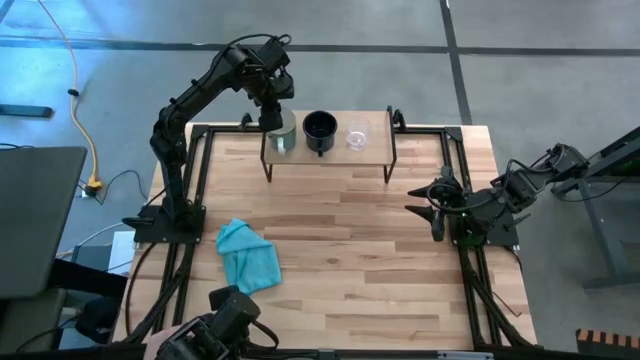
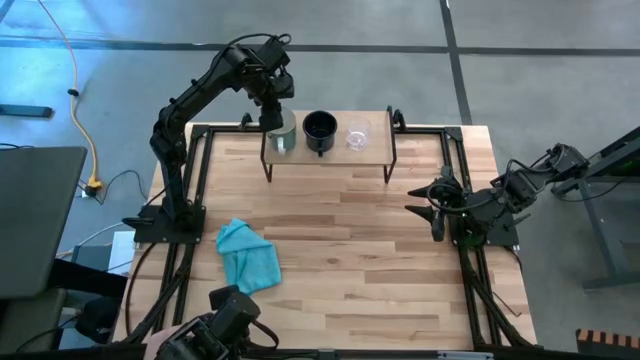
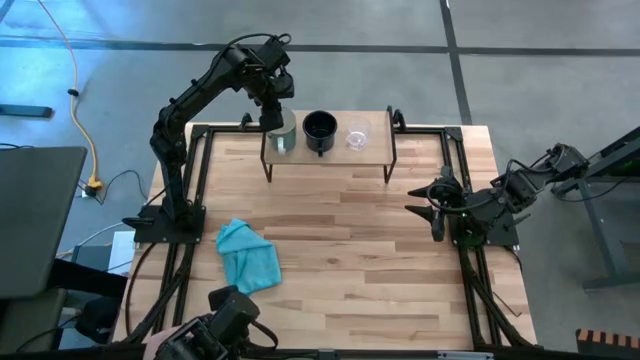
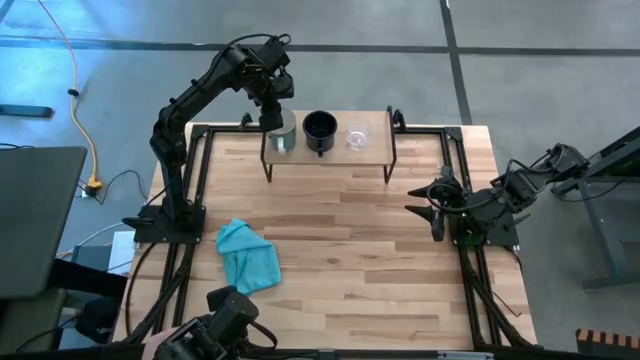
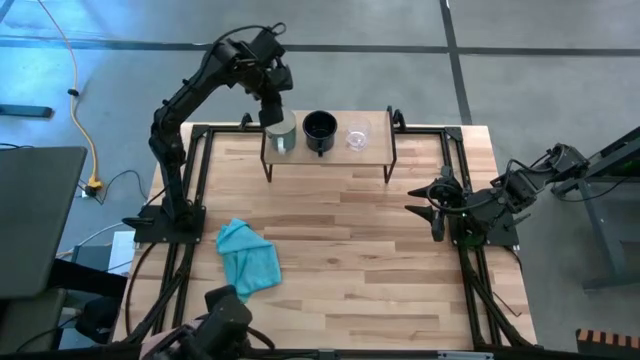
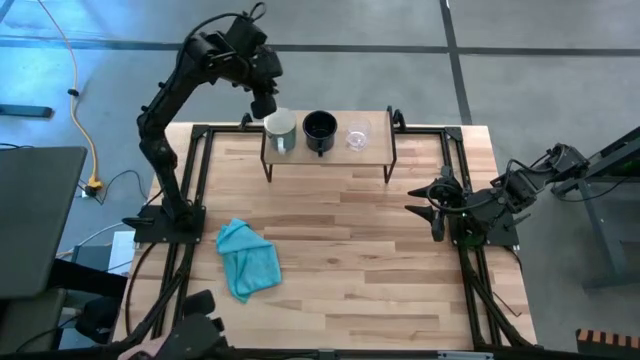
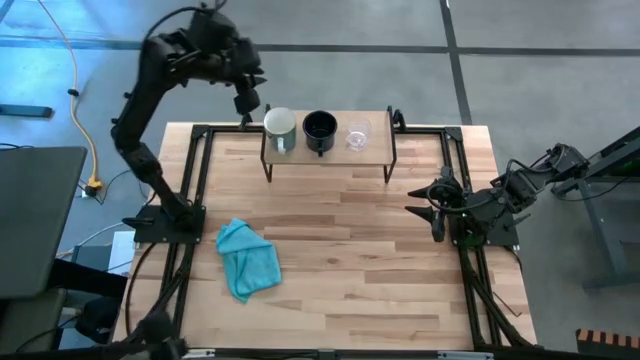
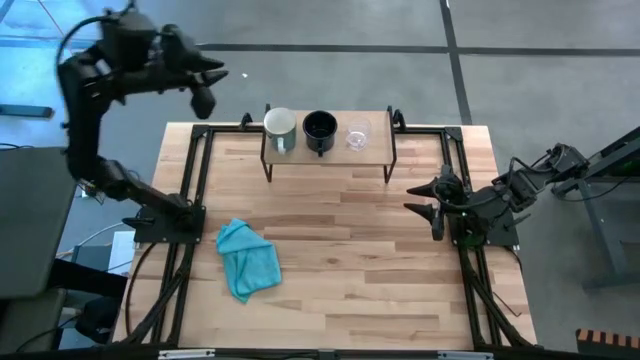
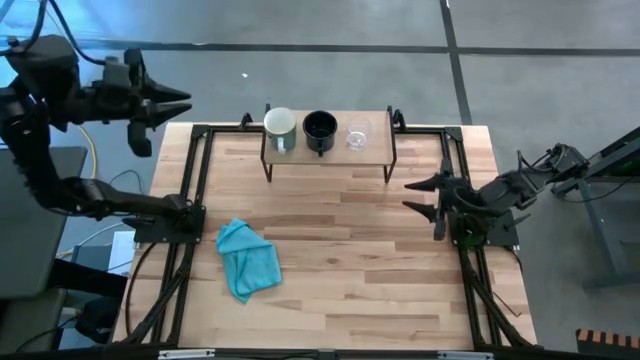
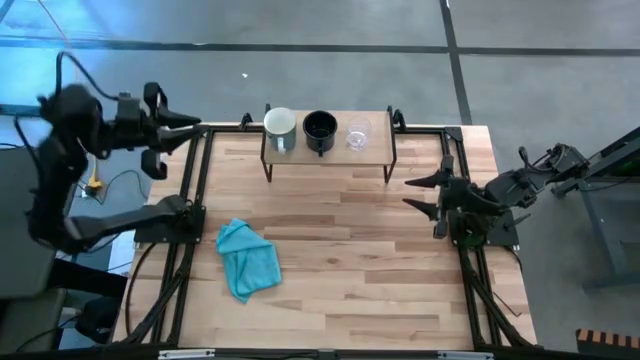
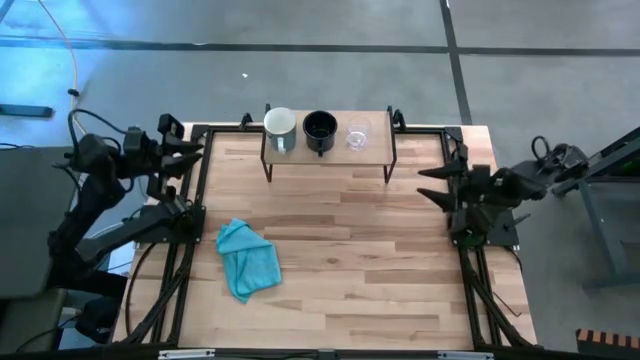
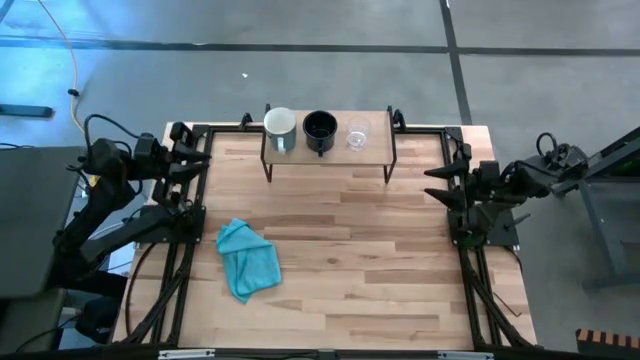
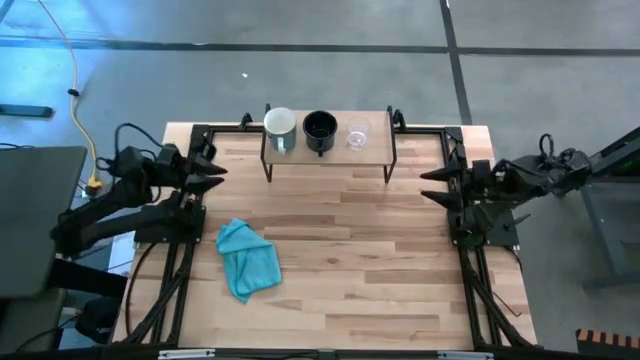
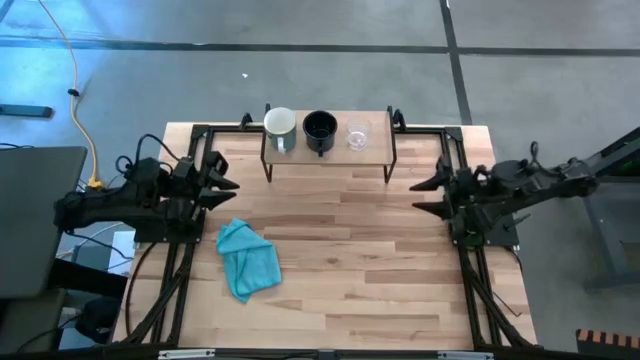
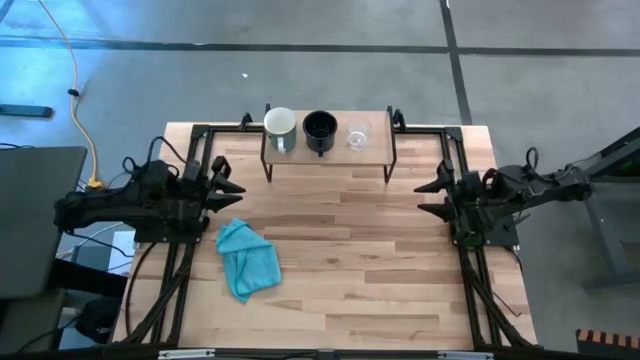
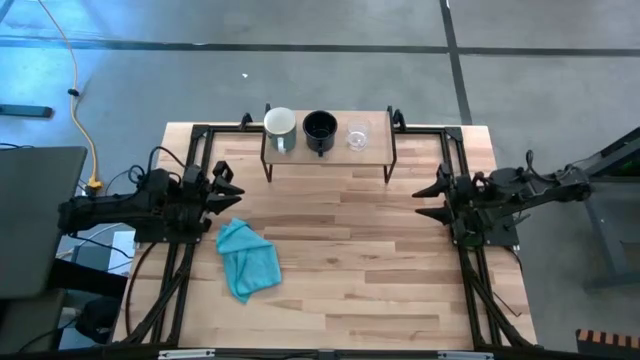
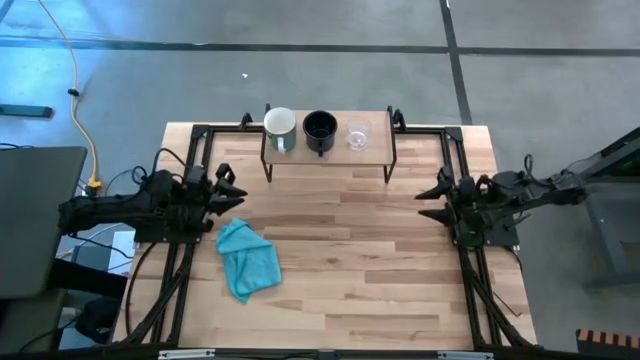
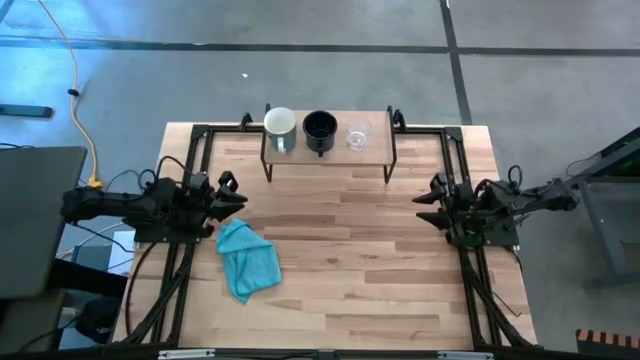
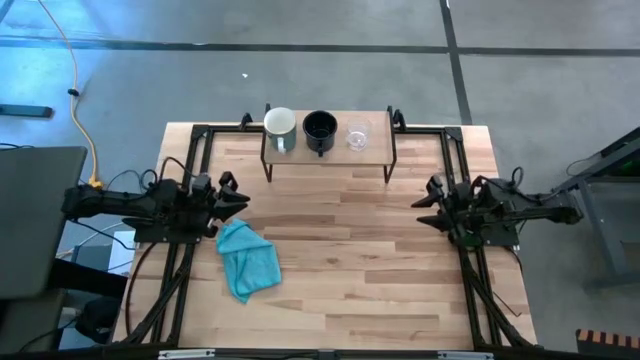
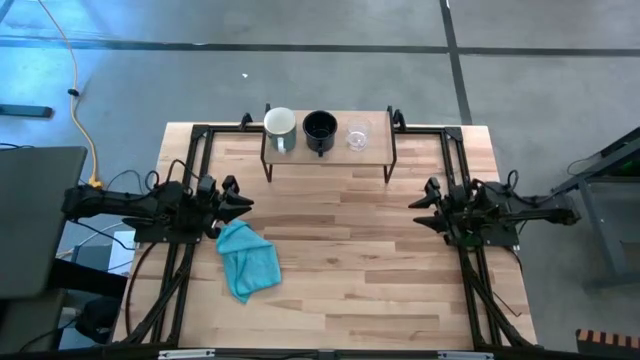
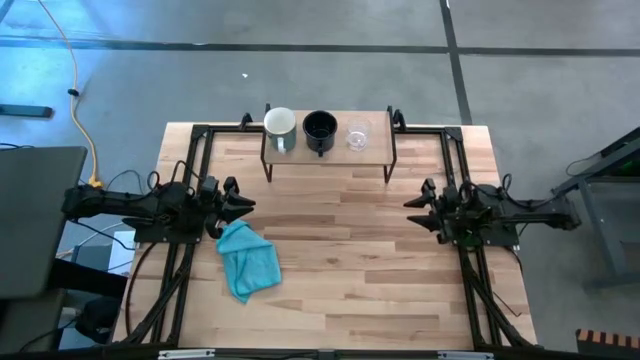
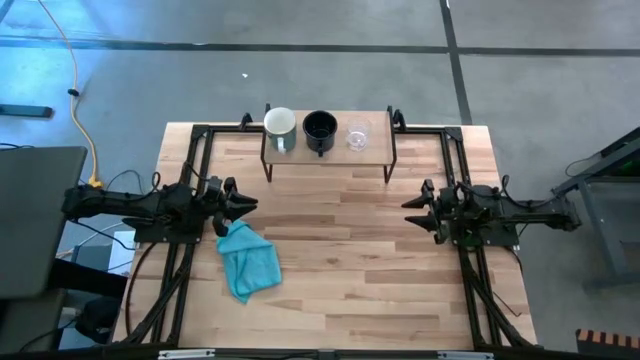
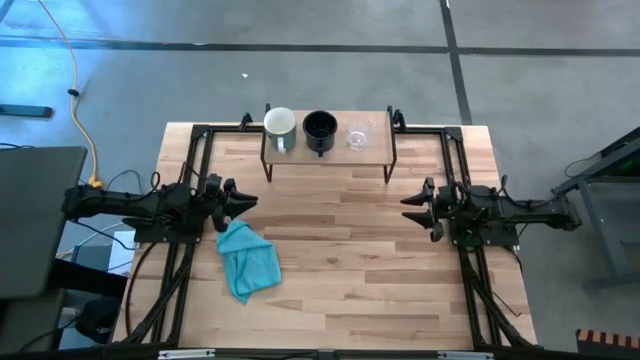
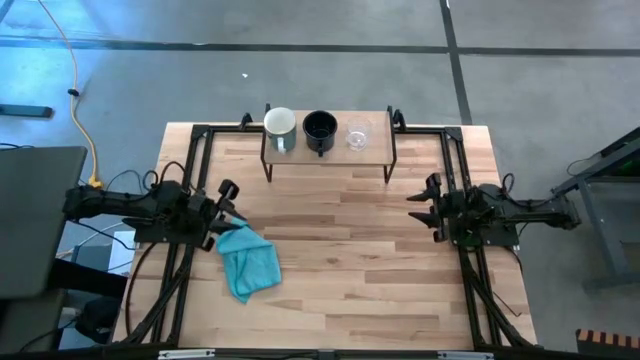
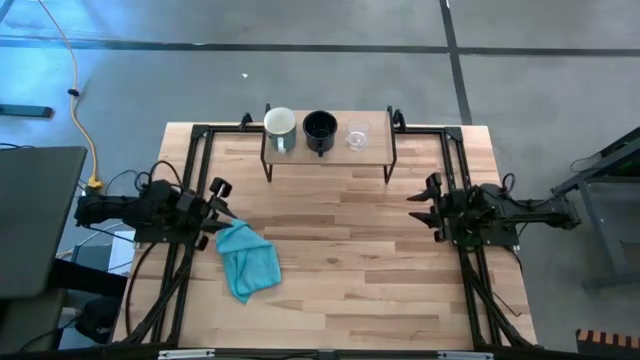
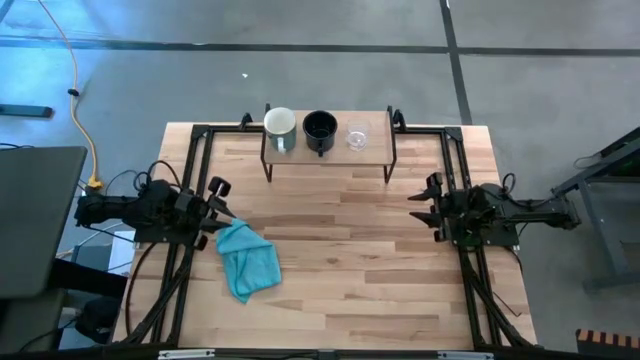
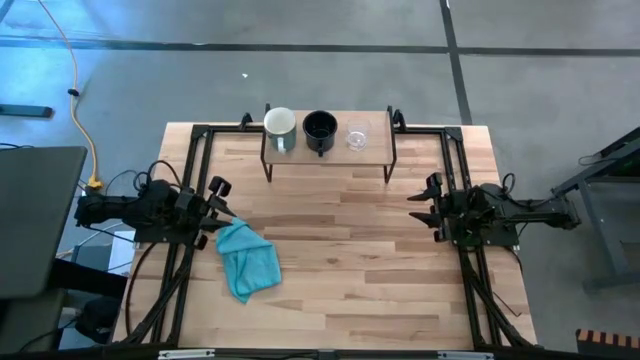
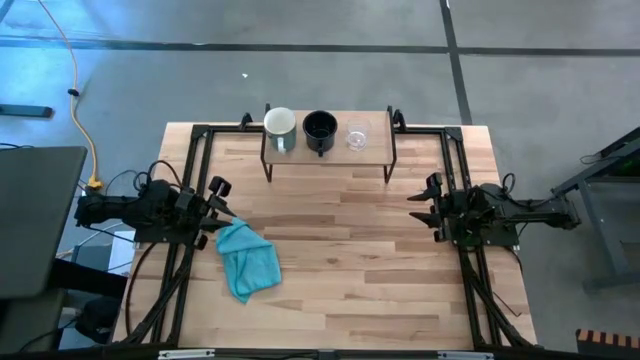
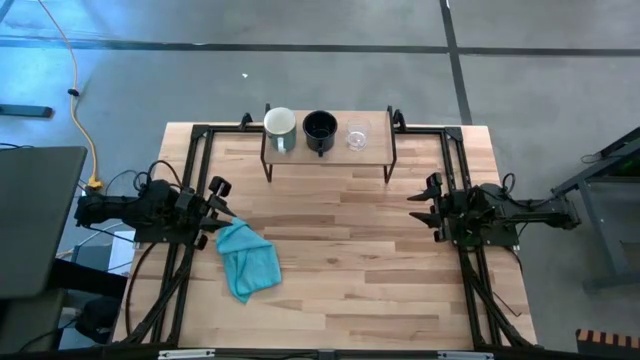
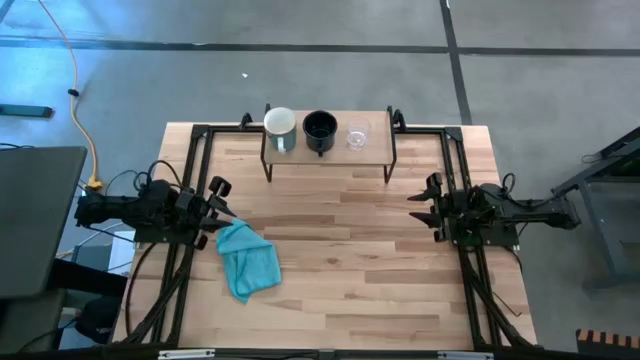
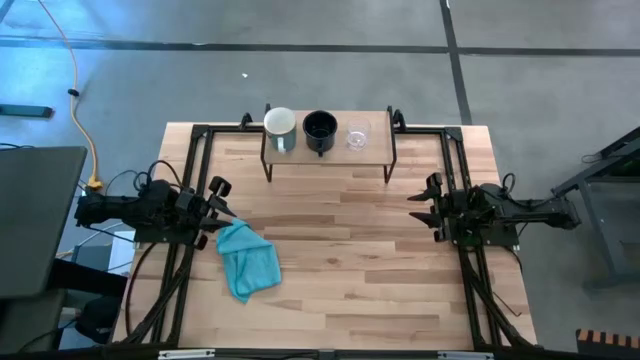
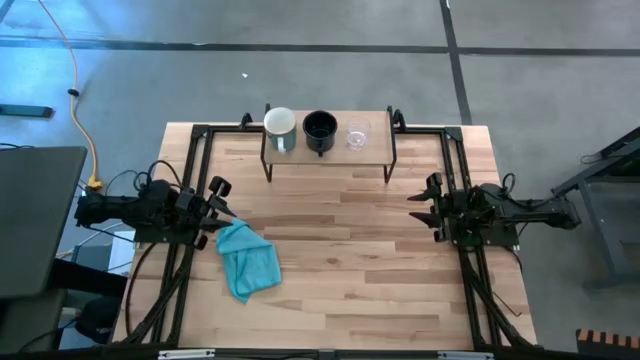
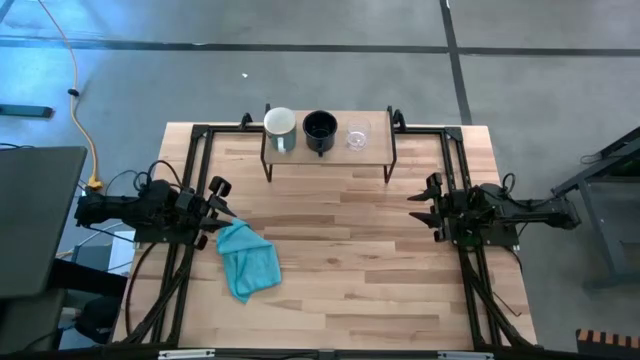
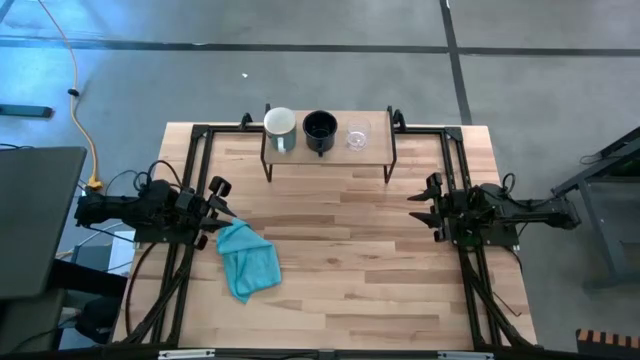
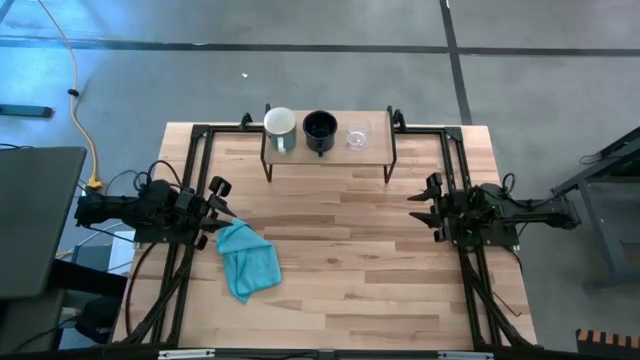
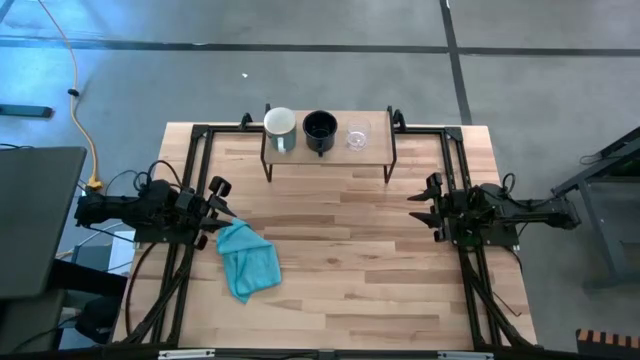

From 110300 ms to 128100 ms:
Task: Stack small to large cups/mugs on shelf
Return to Home Position

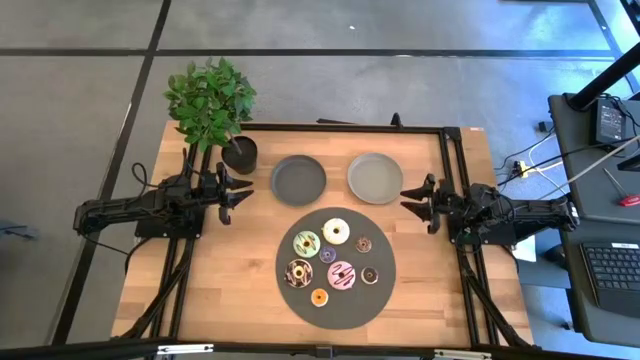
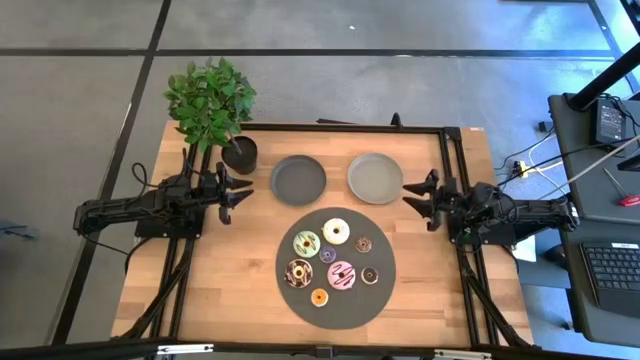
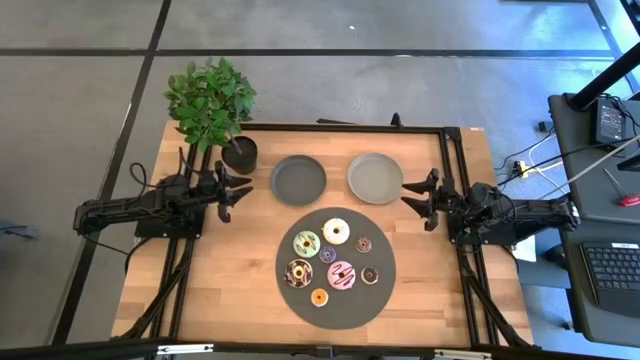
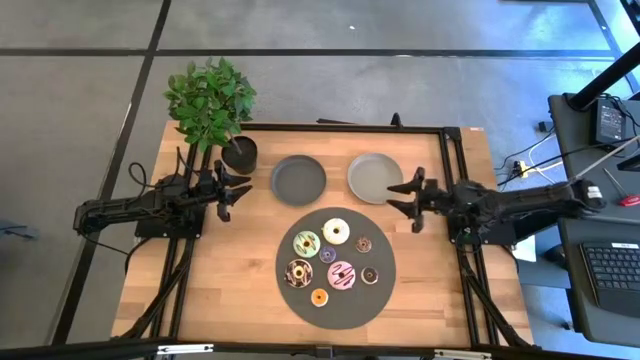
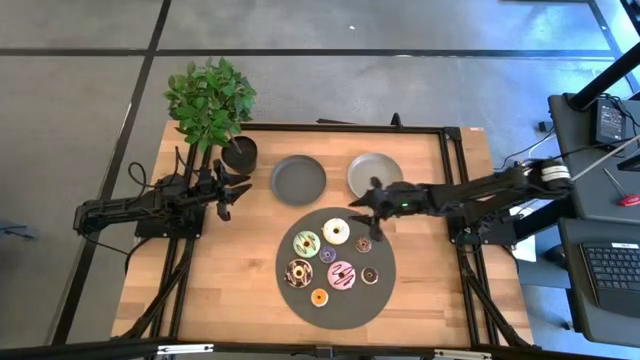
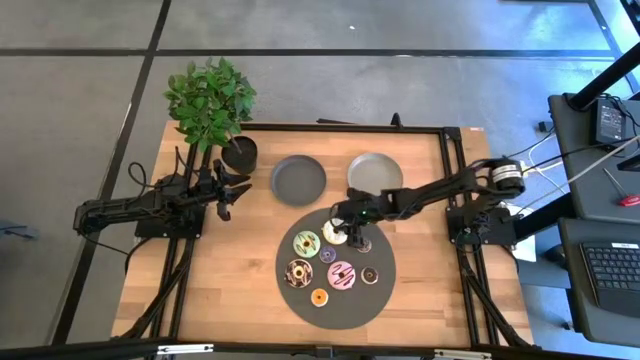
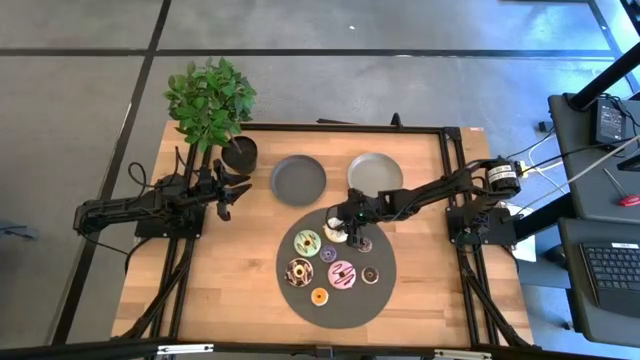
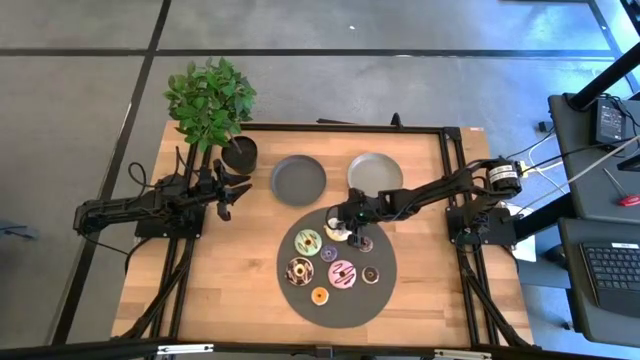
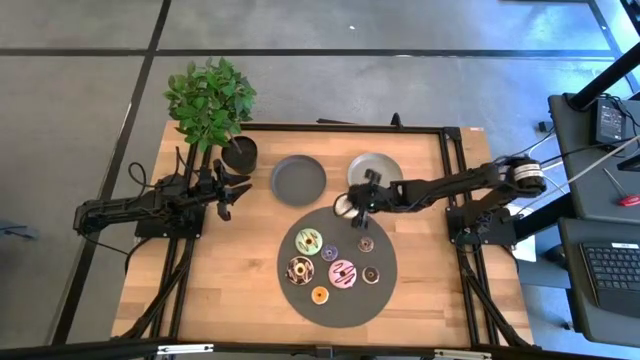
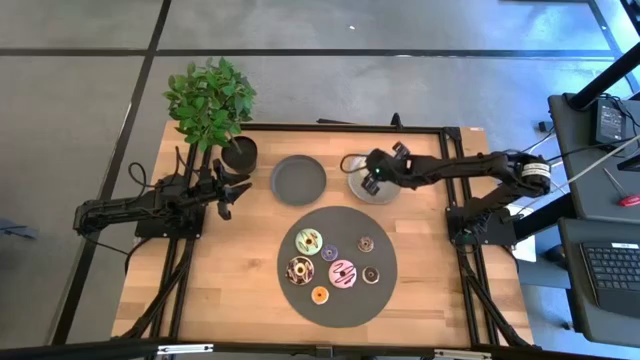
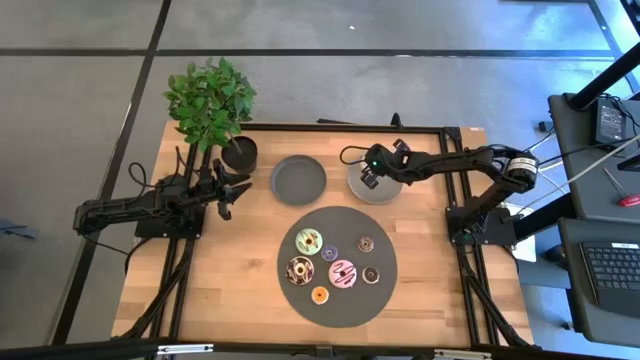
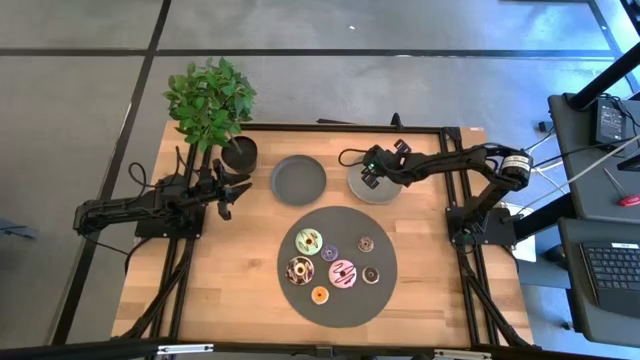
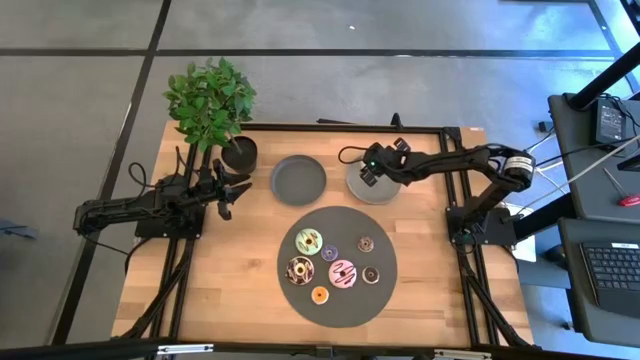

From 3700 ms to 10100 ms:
Task: Pick & Place donuts
Put the large white donut on the light gray plate
